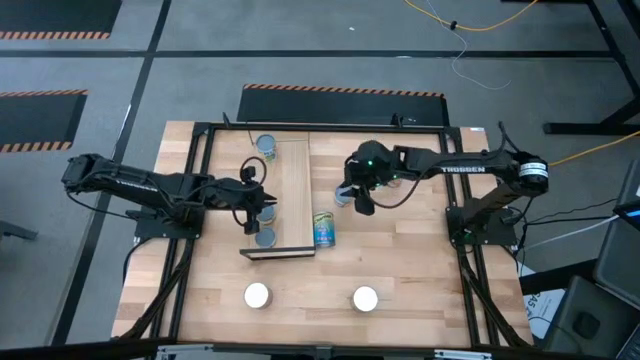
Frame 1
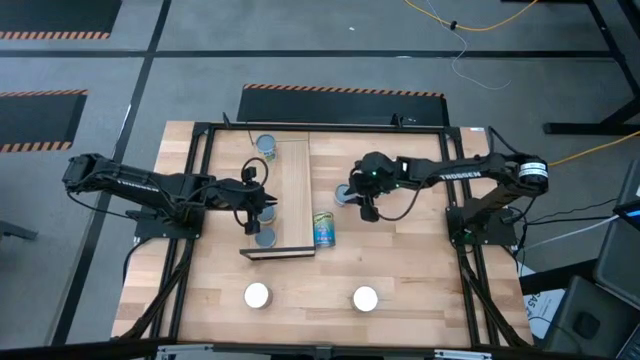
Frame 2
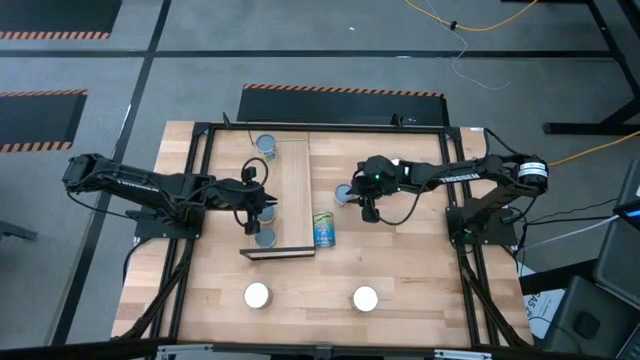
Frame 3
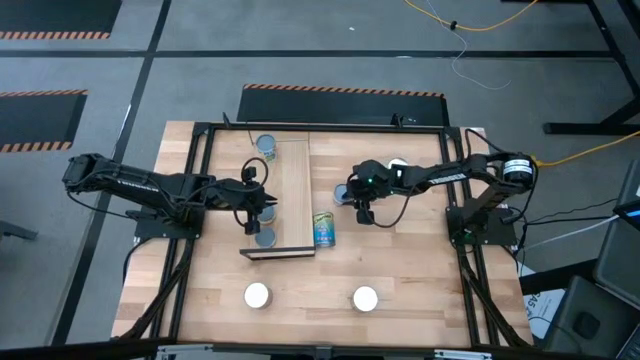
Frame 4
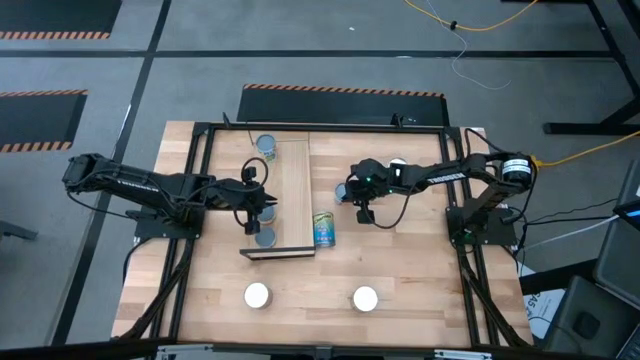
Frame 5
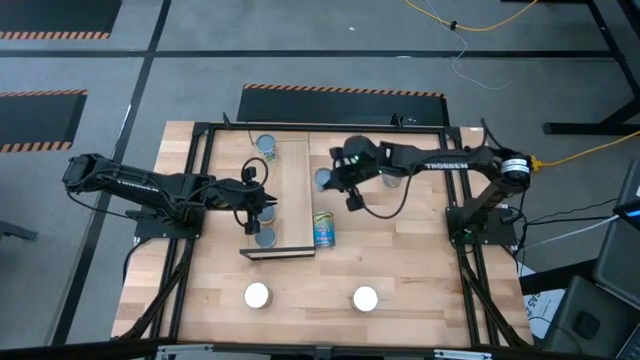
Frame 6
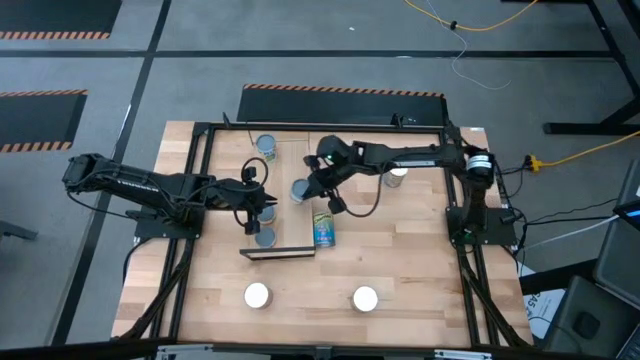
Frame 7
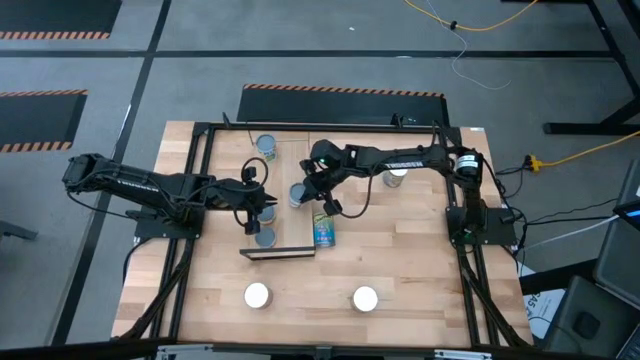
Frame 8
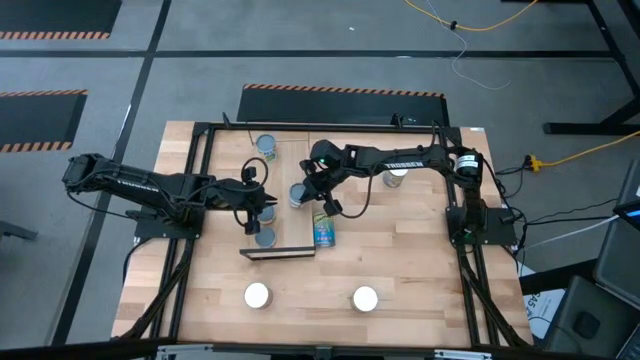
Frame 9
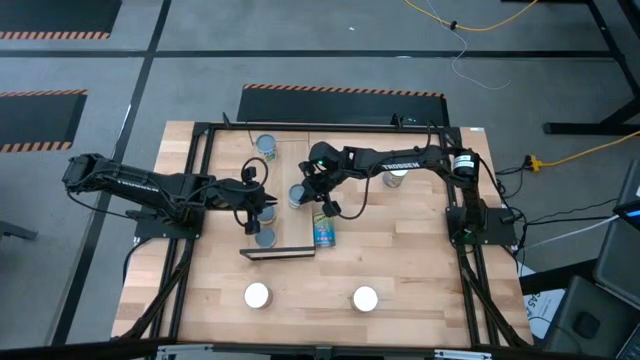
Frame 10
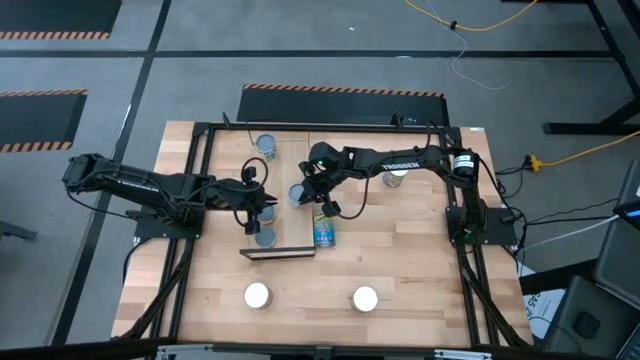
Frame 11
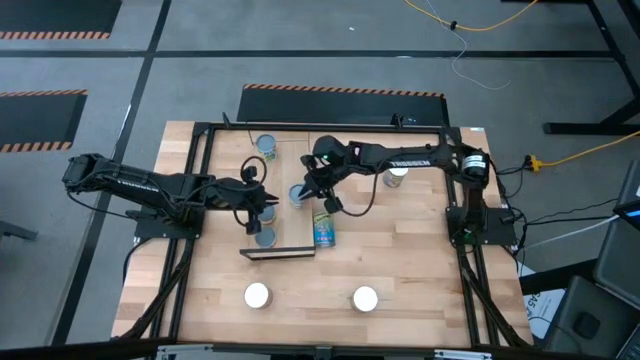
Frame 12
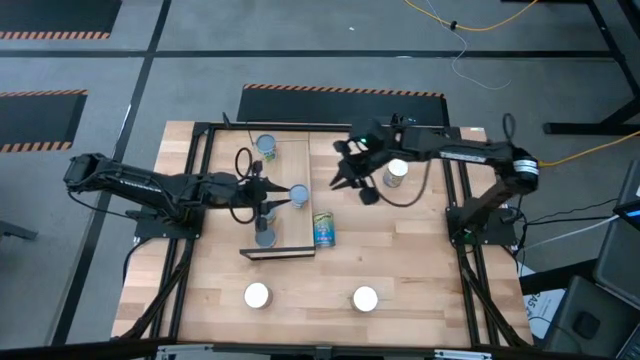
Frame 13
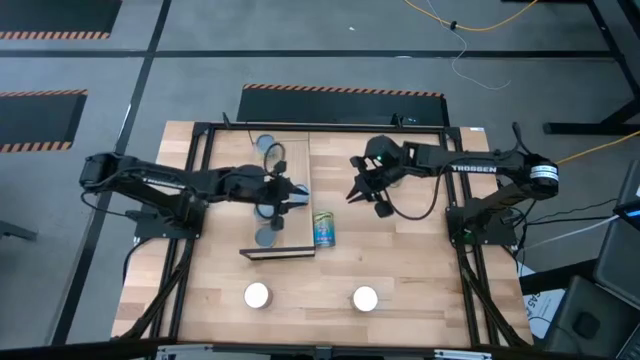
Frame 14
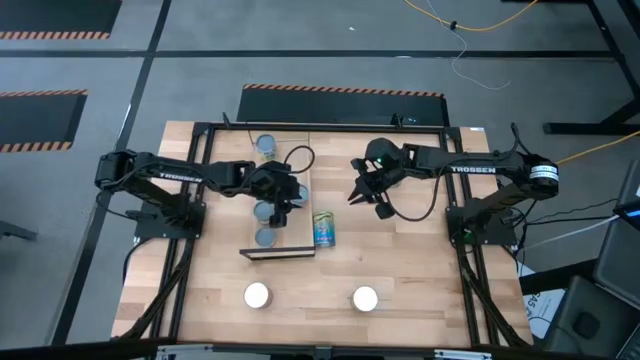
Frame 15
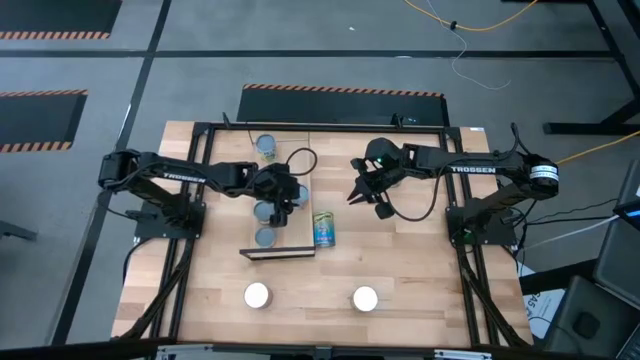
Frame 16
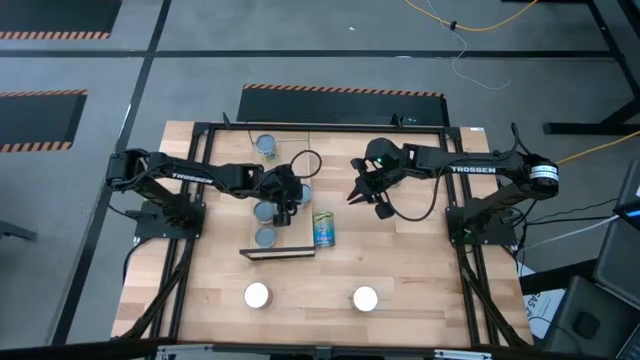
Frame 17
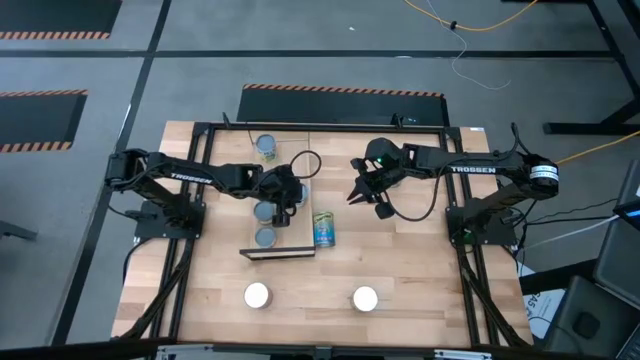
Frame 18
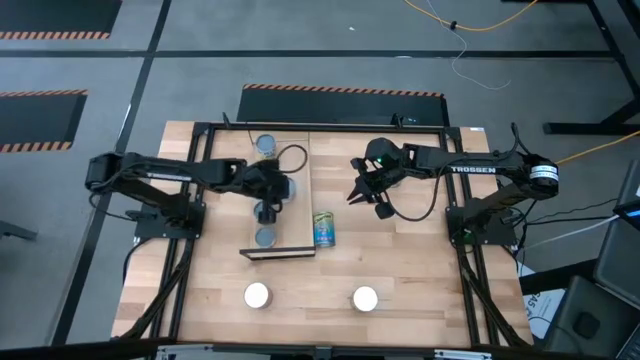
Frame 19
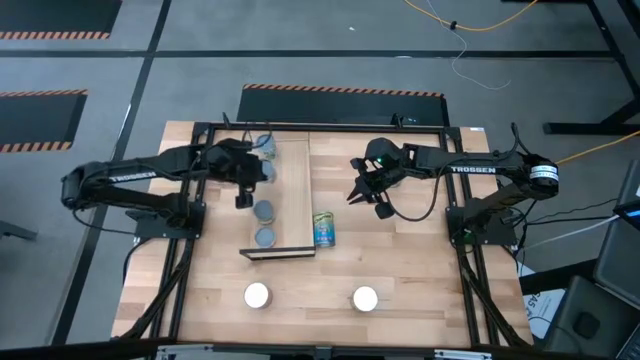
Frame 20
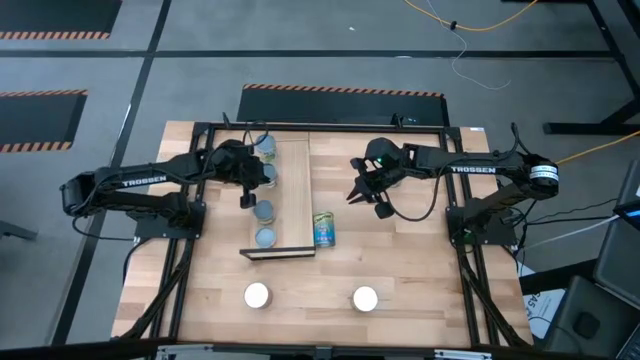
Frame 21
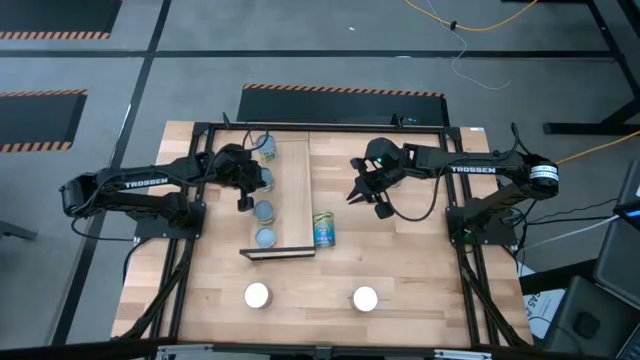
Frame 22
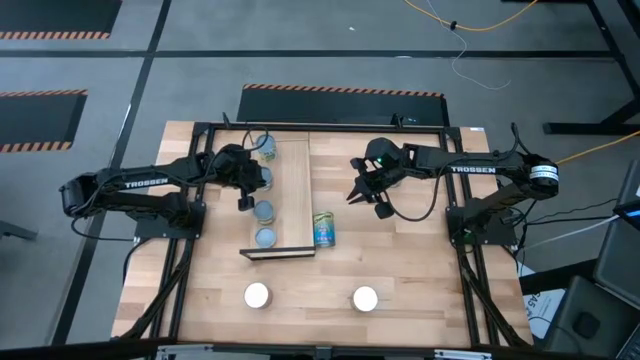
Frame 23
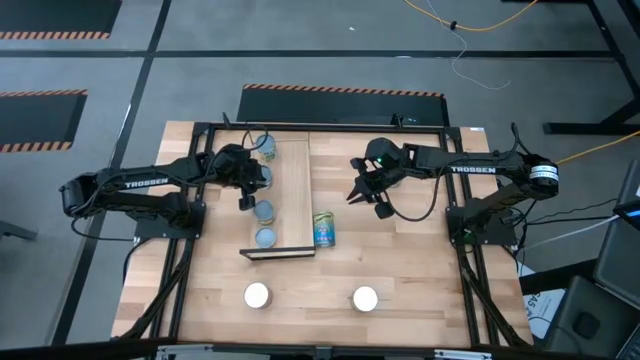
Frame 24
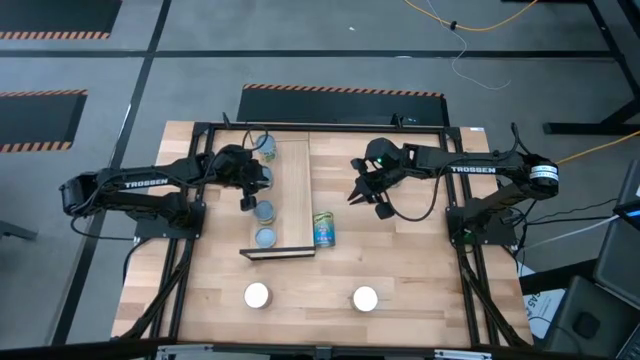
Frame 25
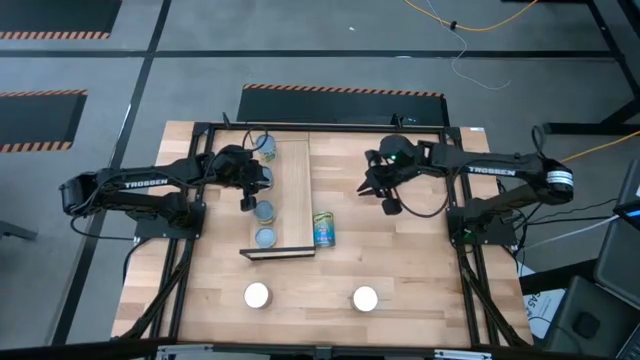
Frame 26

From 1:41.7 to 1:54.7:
Task: Pick and place cans onto a shelf
Put the small canned oranges on the shelf

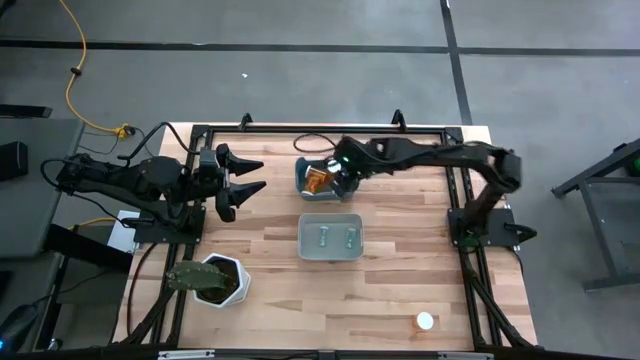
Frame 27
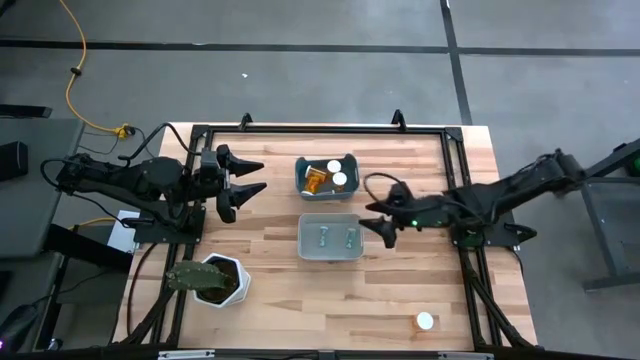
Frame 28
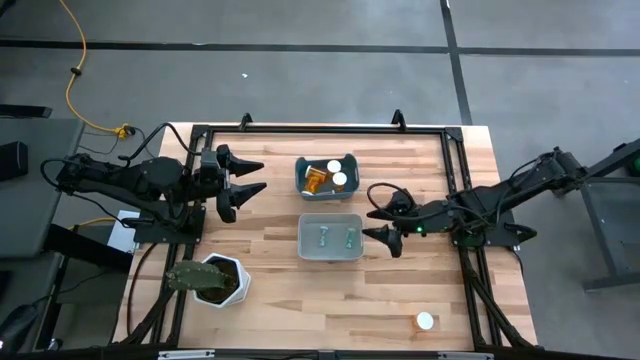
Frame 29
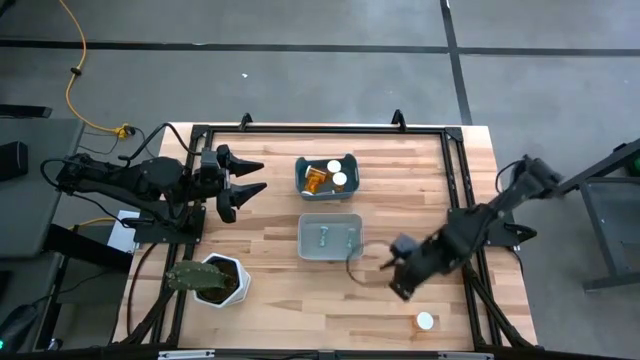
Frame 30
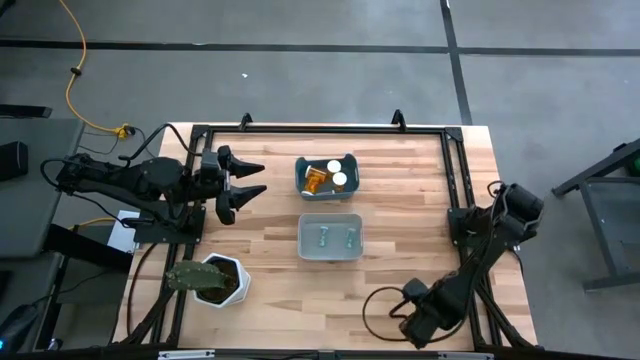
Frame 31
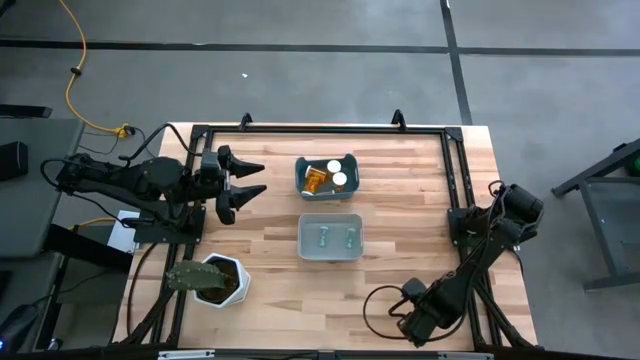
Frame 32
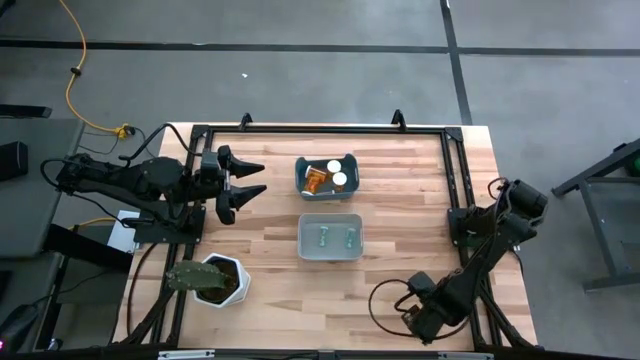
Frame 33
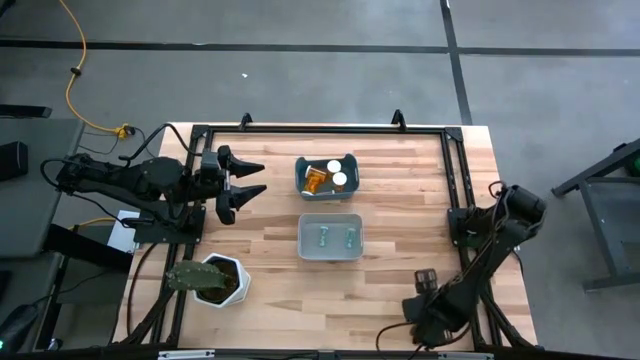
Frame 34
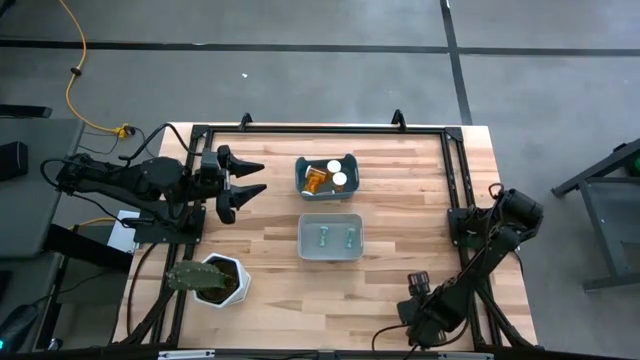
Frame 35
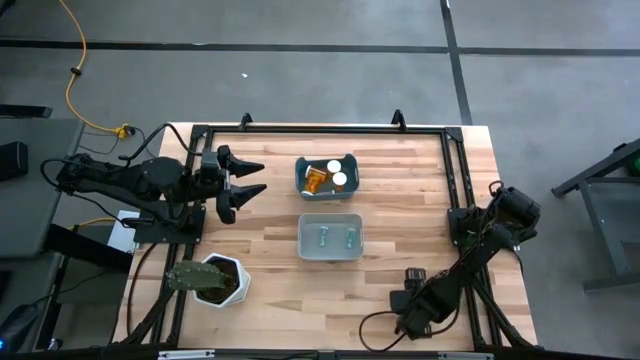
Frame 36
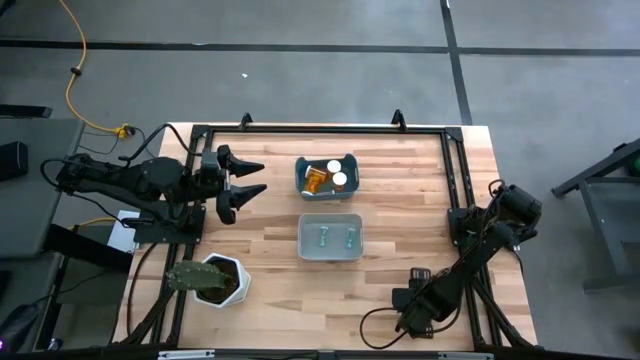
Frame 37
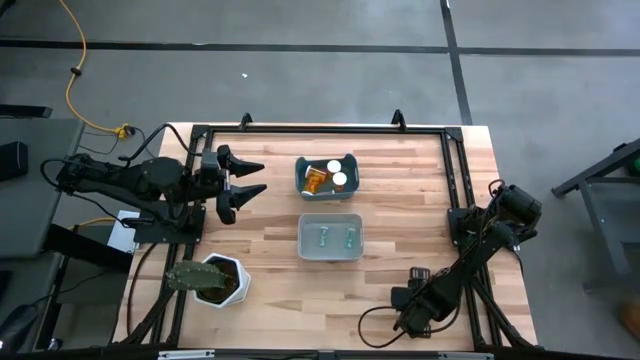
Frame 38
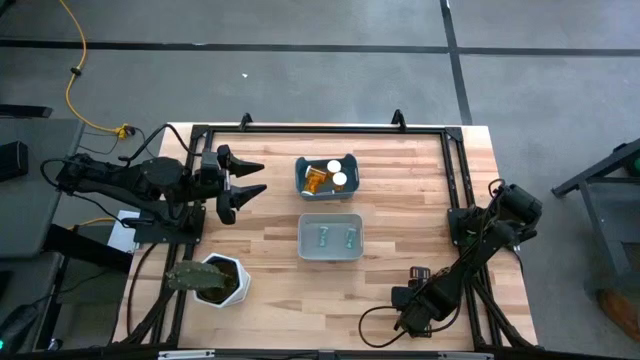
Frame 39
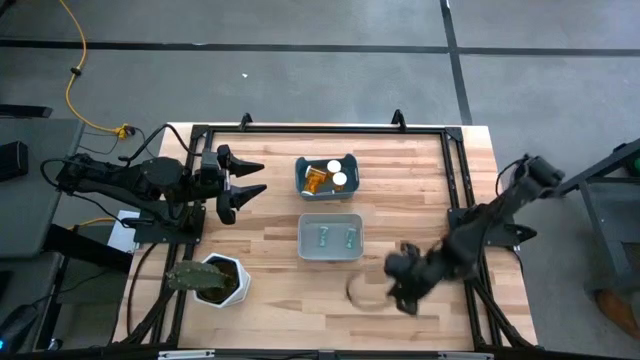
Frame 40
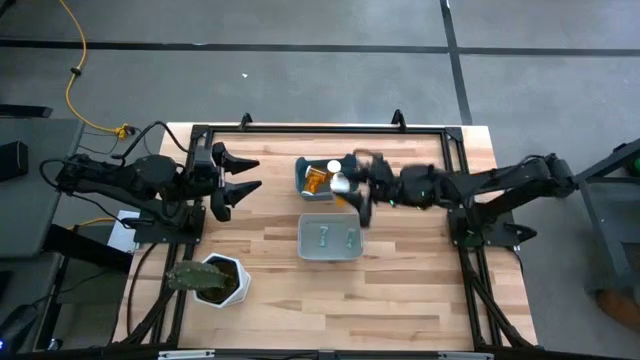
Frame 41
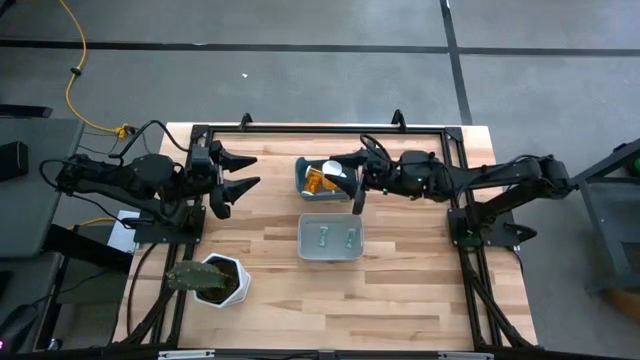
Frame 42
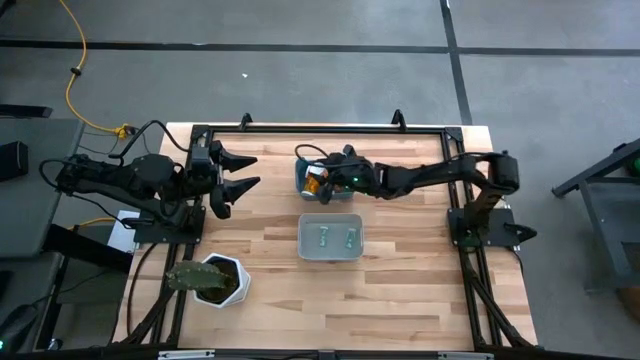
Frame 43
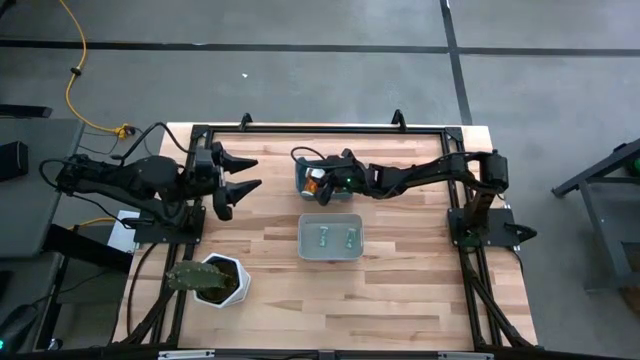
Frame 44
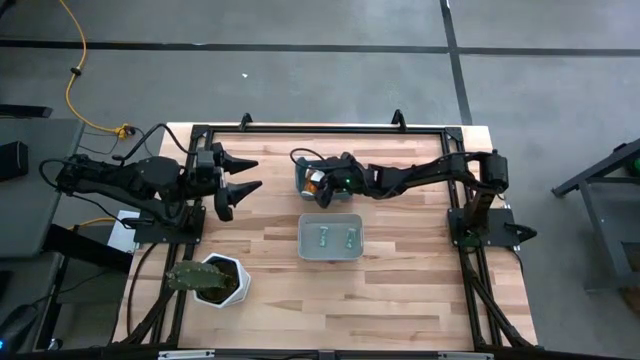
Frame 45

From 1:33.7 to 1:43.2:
Task: Pick and place medicine bottles into bin by pill shape (circle, oval)
Put the orange capsule bottle into the blue bin
